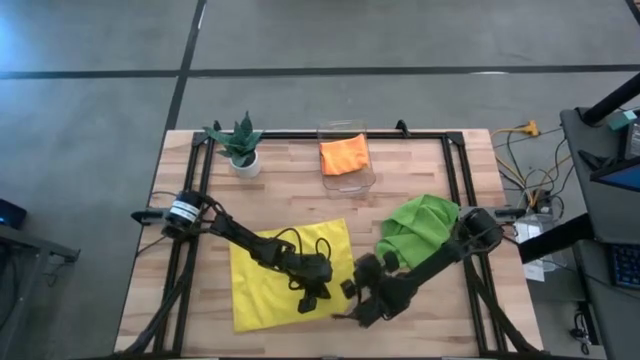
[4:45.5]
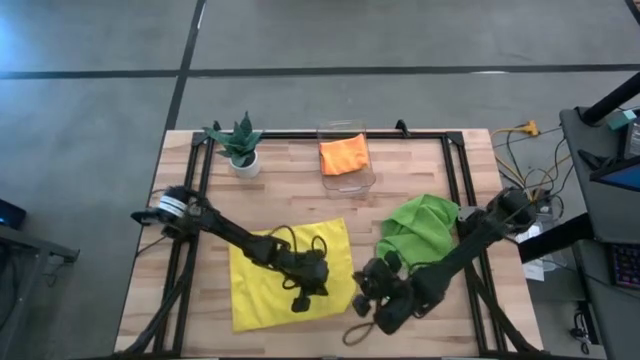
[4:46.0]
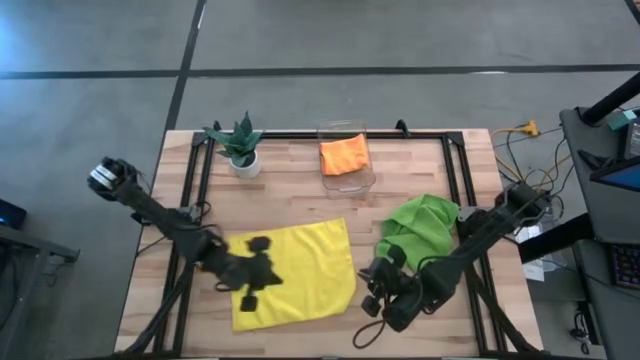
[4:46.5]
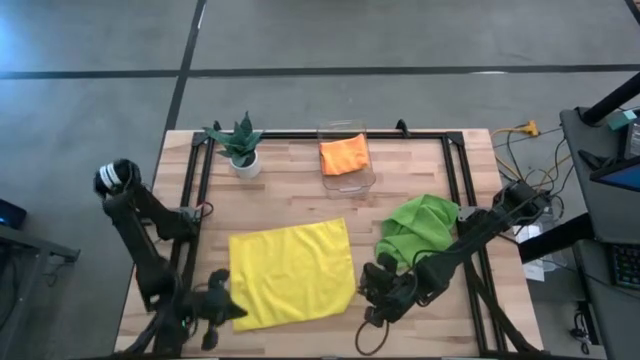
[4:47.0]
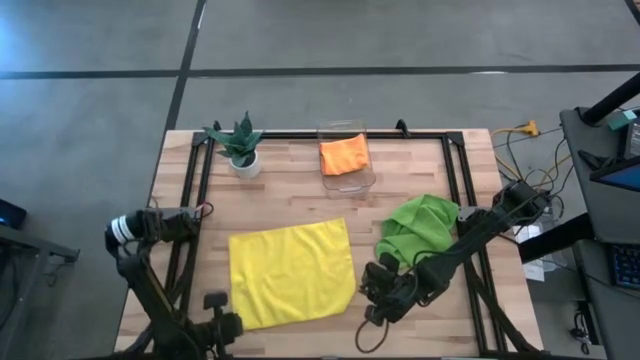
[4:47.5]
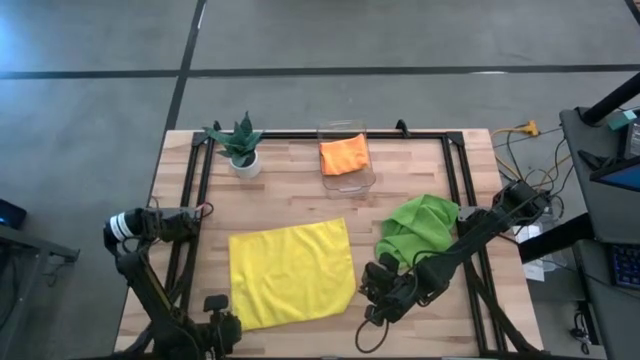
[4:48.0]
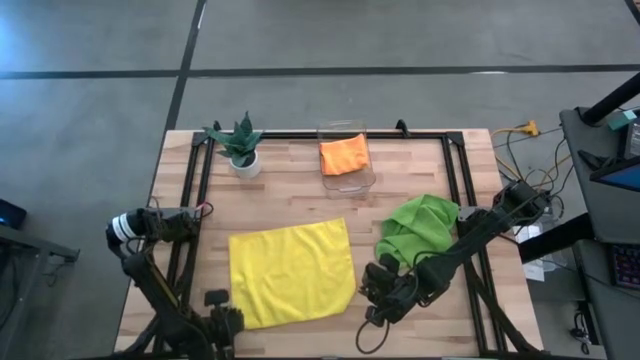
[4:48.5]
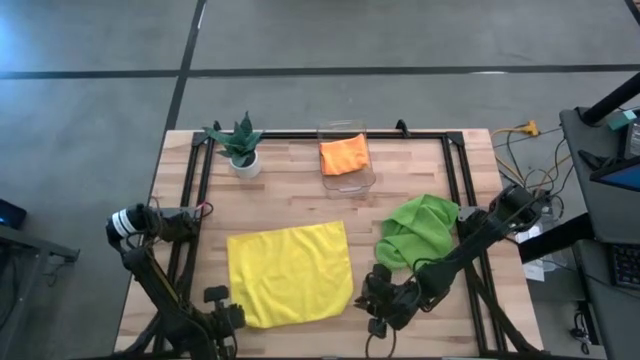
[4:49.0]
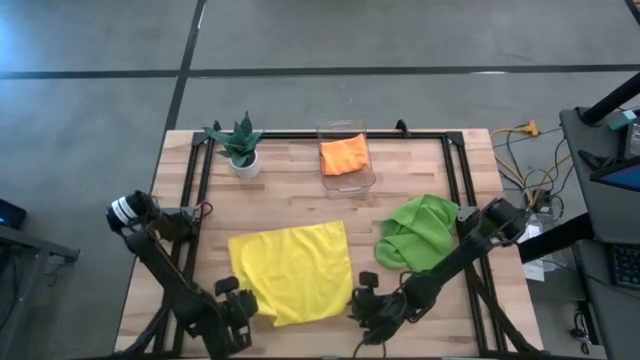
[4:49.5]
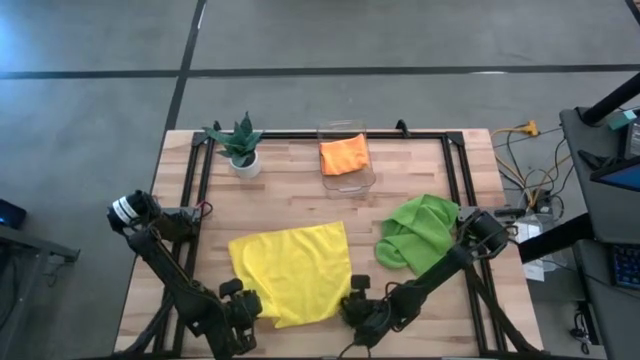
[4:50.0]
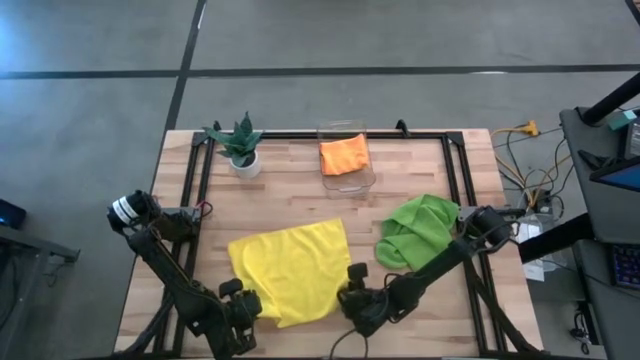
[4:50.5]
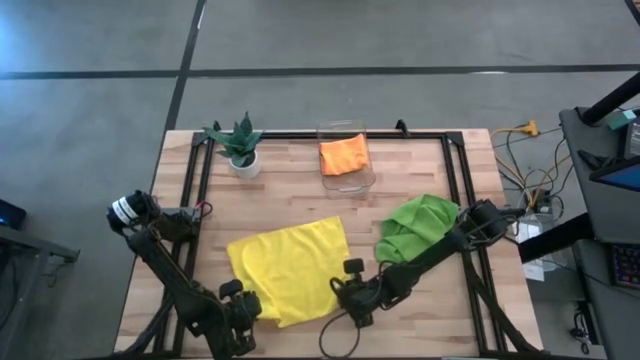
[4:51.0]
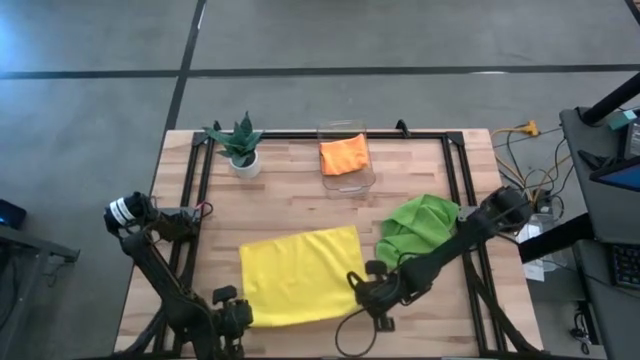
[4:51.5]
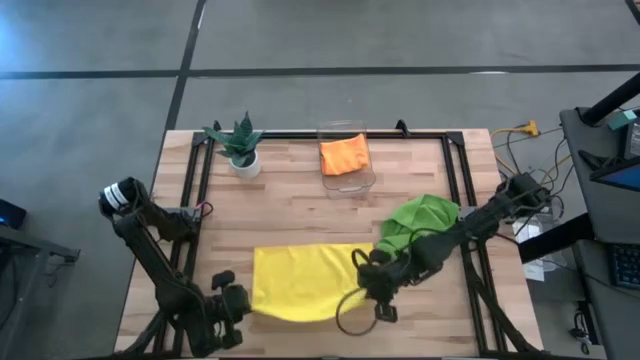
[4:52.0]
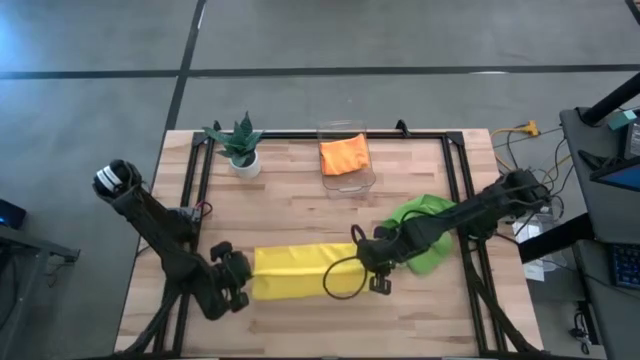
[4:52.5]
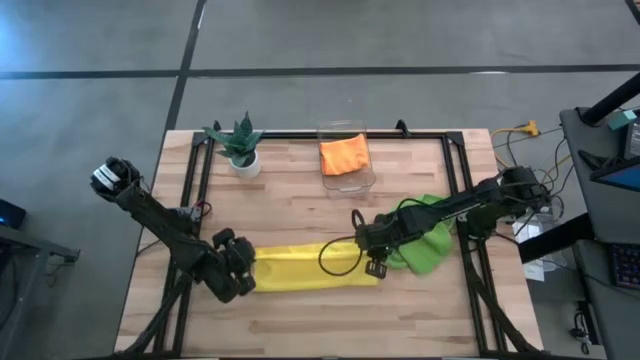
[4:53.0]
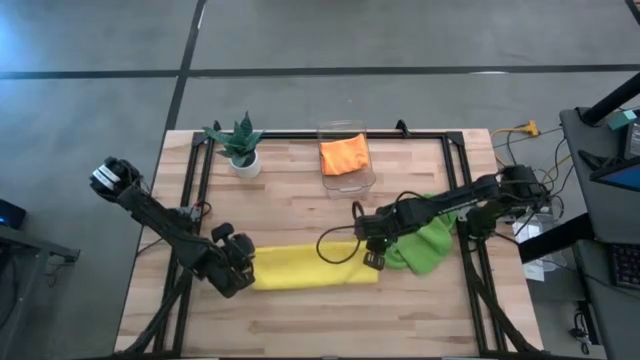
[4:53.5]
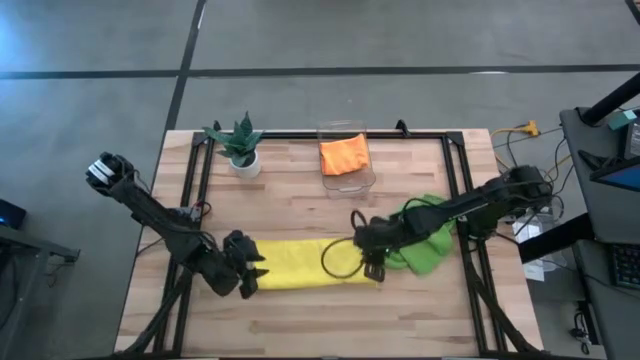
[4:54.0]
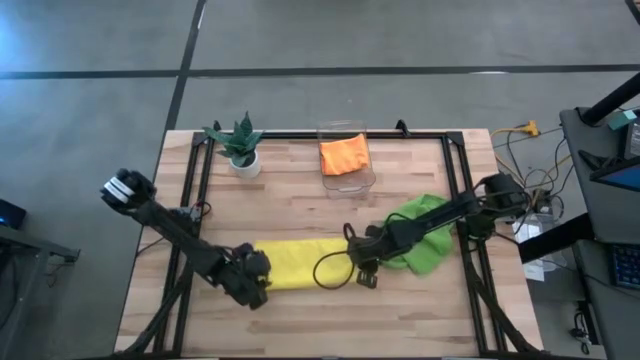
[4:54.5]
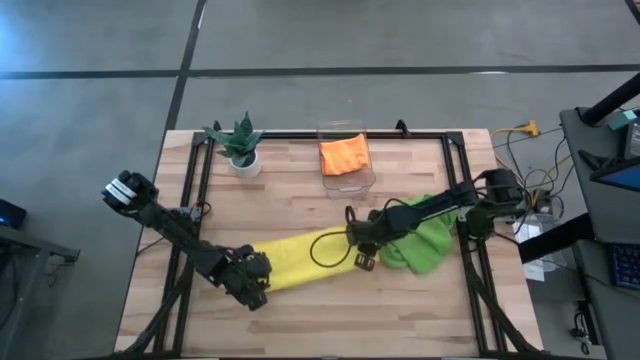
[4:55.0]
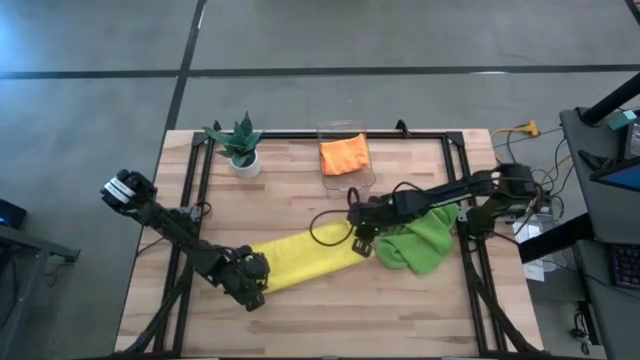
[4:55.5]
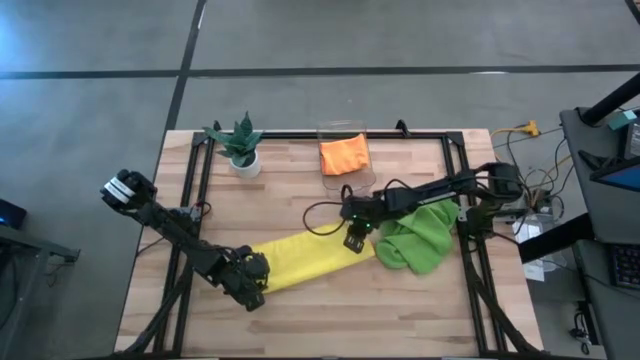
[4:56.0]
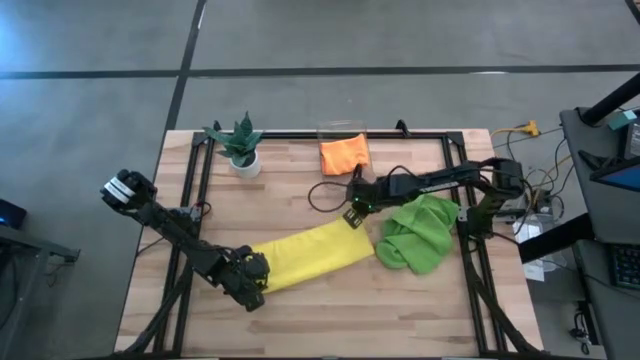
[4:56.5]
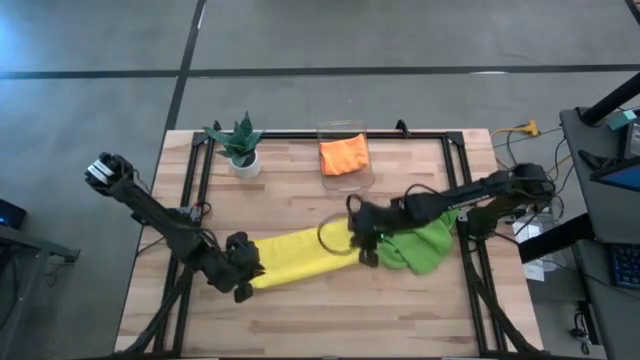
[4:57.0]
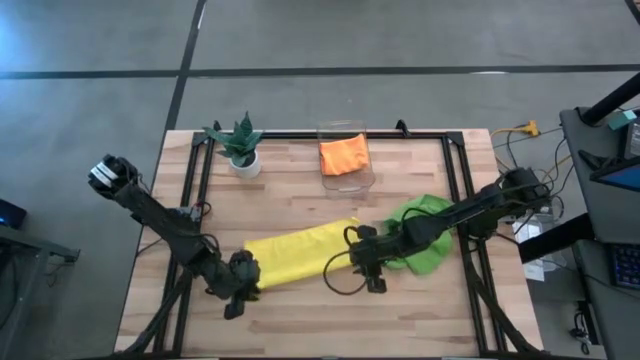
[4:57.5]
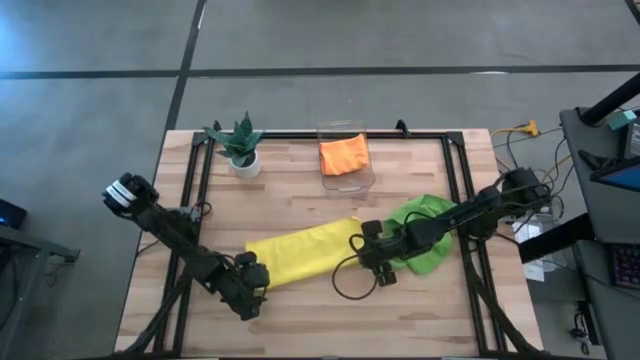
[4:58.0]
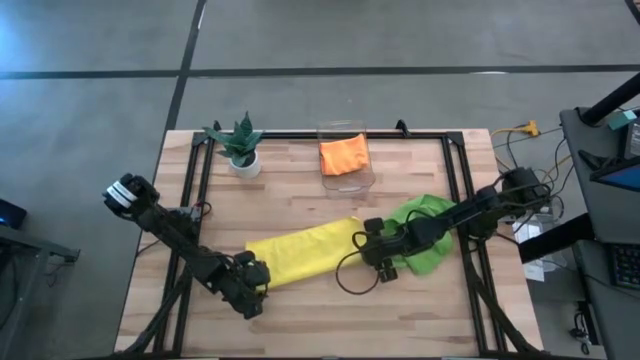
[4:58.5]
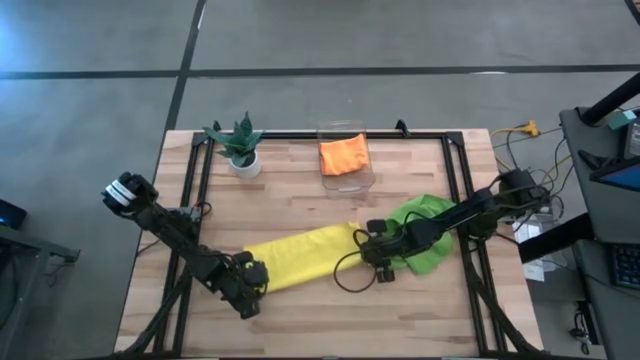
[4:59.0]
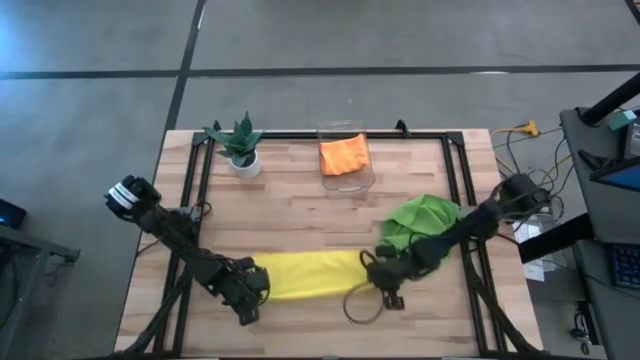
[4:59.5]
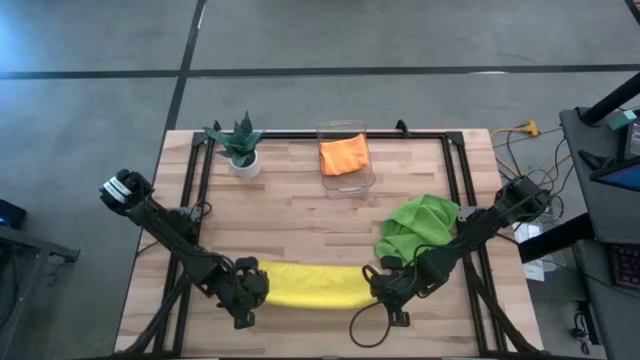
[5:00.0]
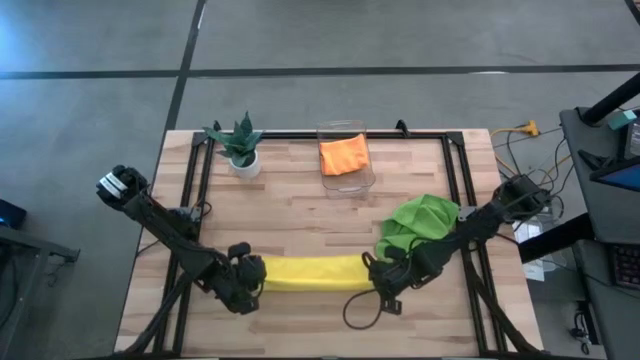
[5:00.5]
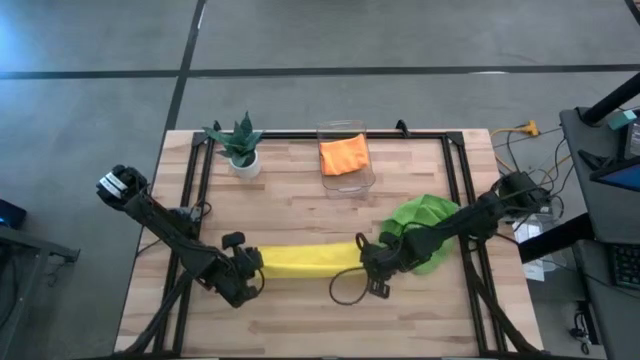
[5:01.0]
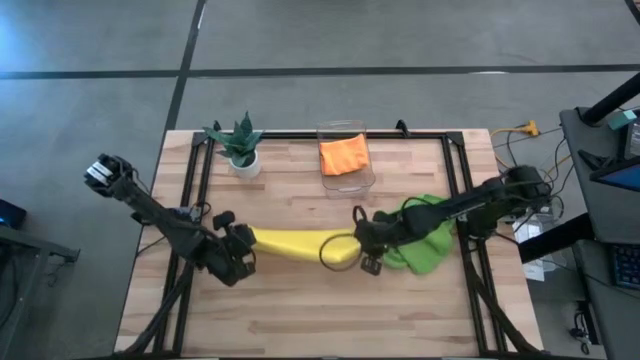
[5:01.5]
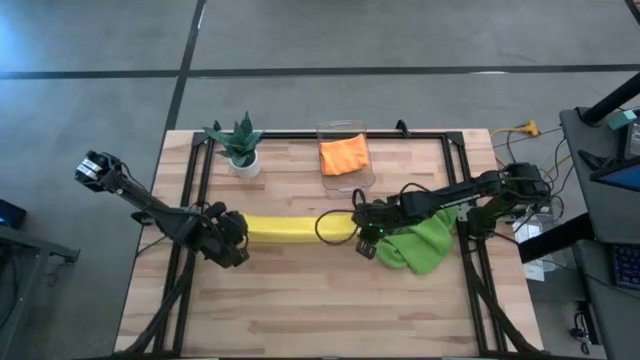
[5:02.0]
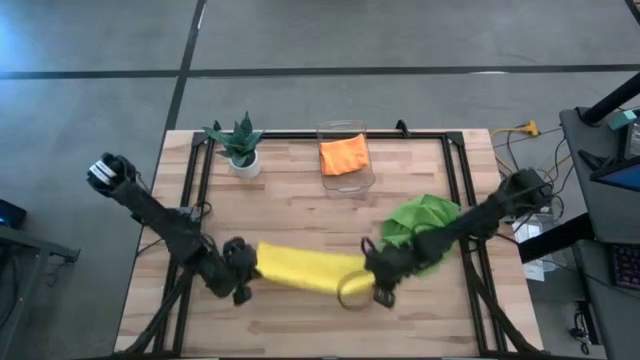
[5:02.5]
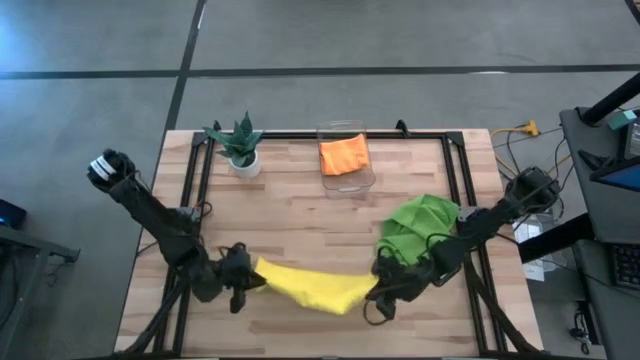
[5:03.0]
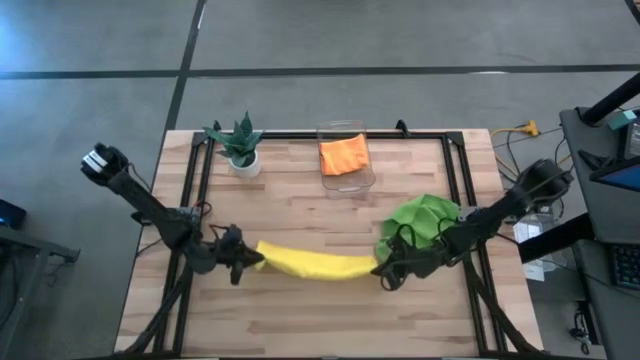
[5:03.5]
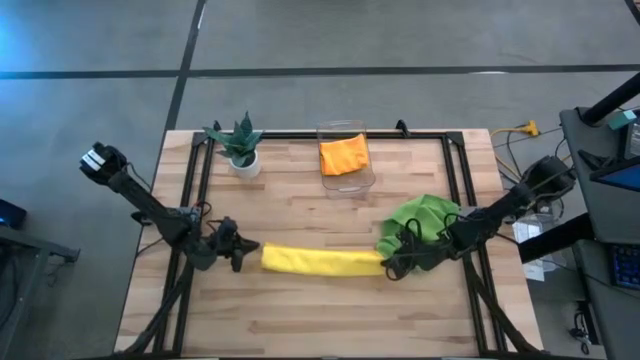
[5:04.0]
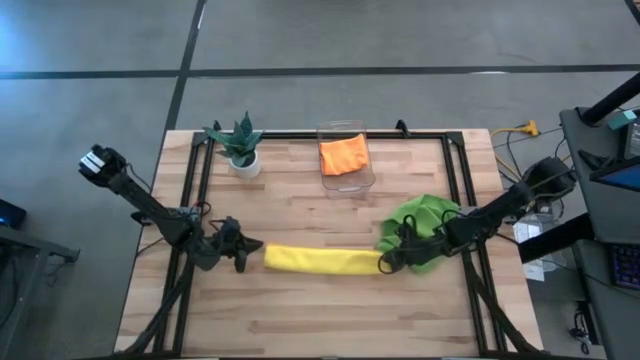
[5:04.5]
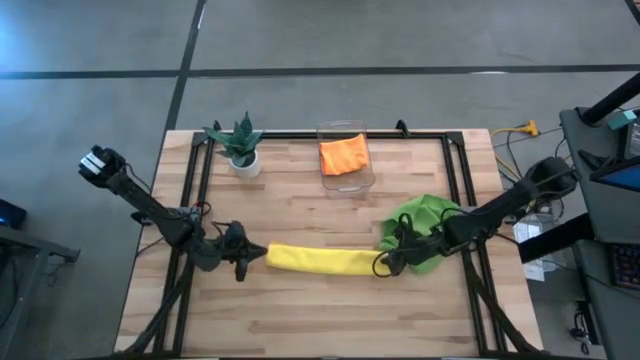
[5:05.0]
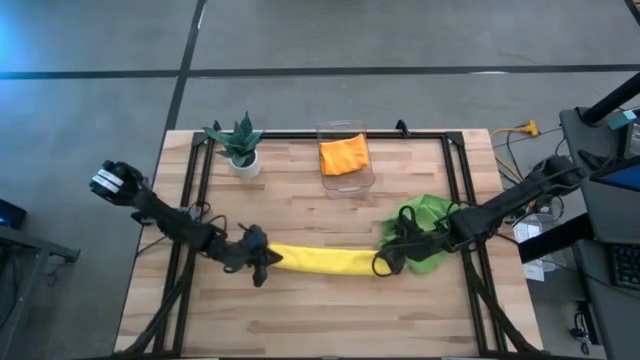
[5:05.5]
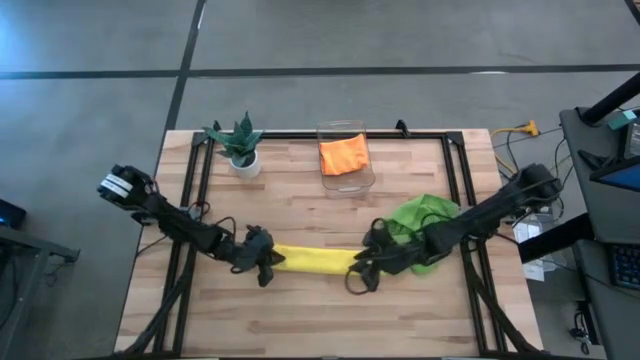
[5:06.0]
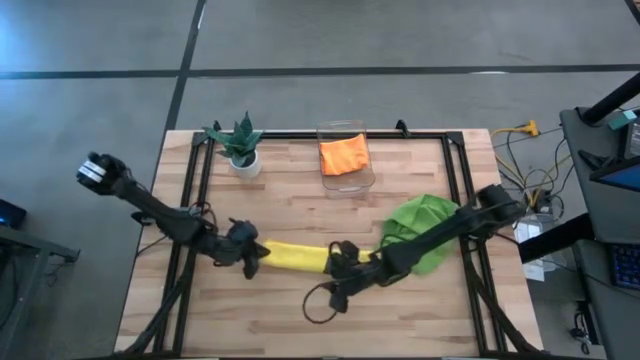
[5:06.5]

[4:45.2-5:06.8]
Task: Fold microfiber towels
Fold the yellow towel
